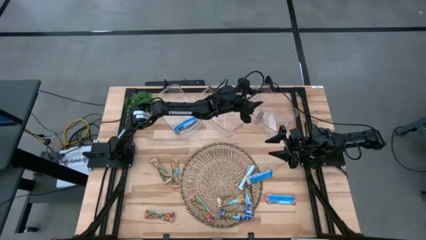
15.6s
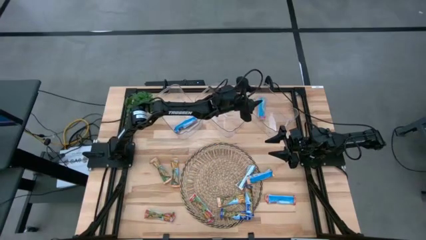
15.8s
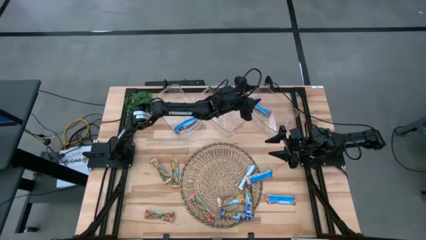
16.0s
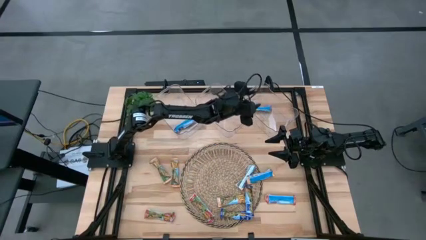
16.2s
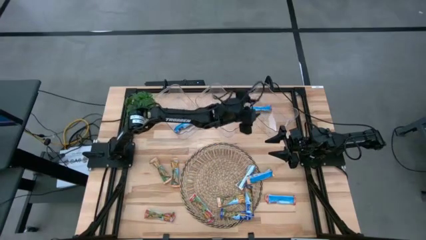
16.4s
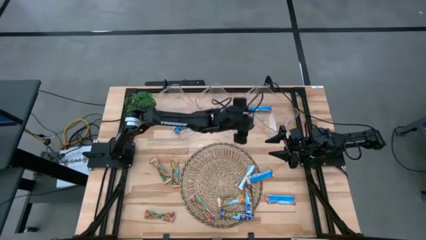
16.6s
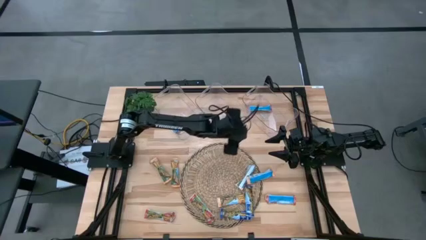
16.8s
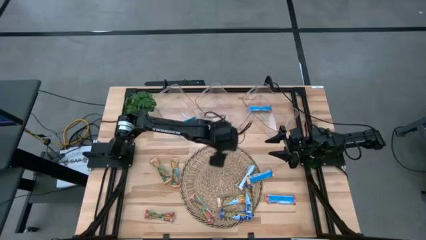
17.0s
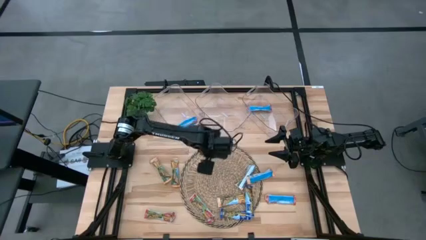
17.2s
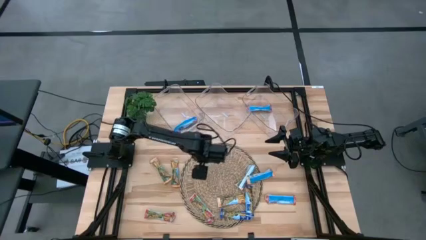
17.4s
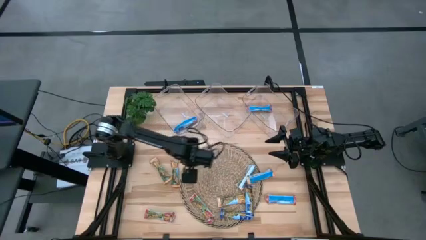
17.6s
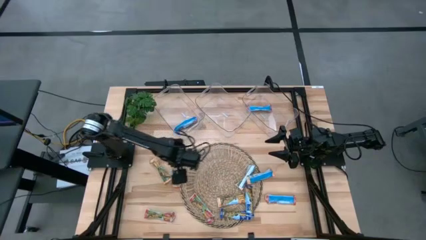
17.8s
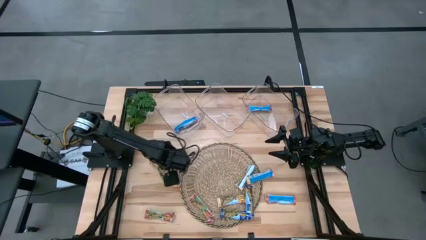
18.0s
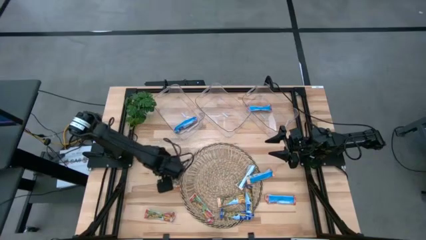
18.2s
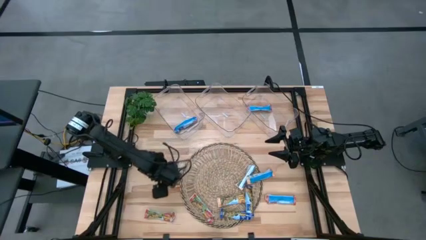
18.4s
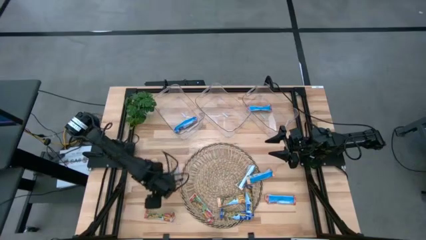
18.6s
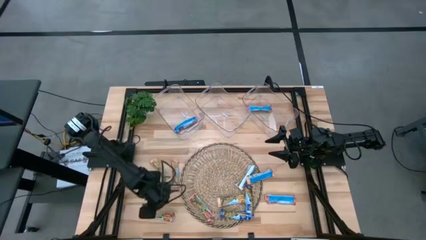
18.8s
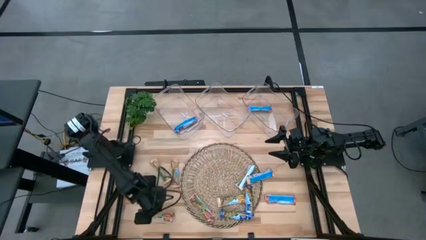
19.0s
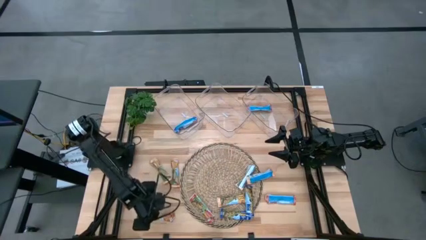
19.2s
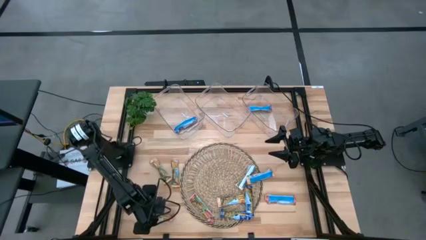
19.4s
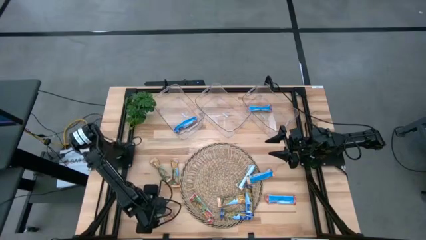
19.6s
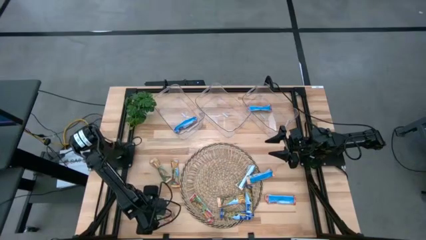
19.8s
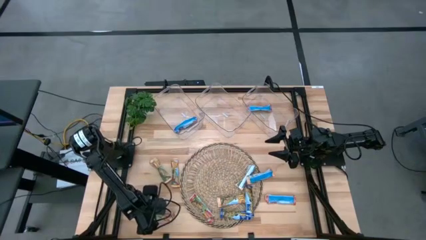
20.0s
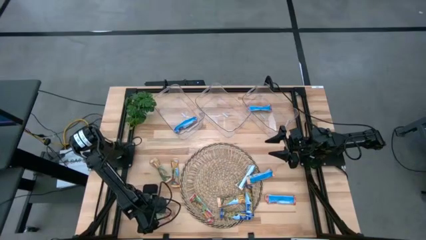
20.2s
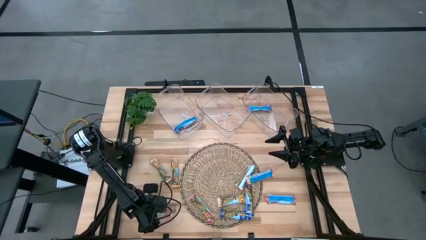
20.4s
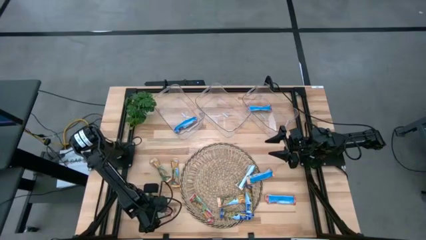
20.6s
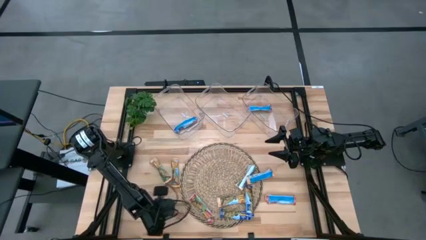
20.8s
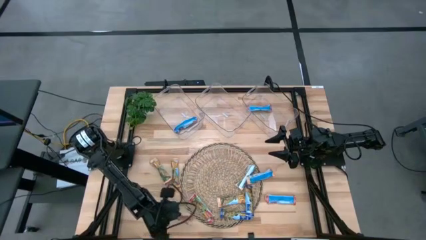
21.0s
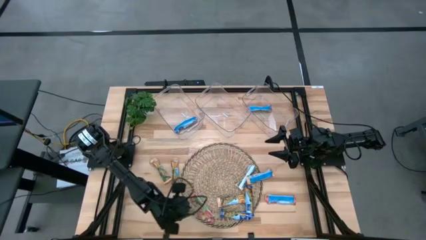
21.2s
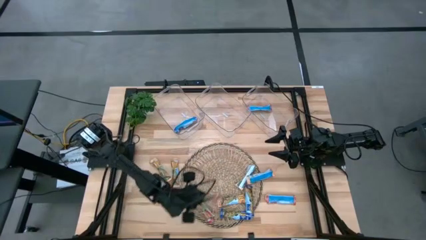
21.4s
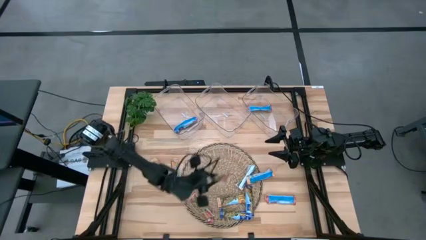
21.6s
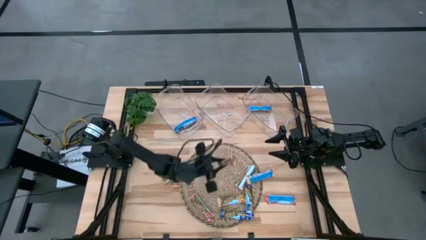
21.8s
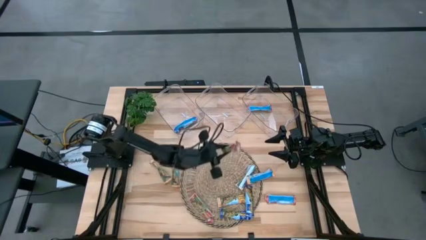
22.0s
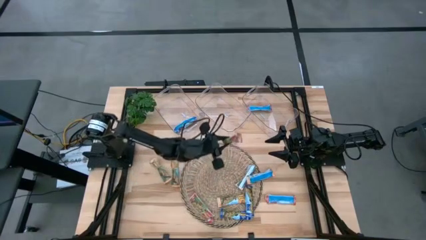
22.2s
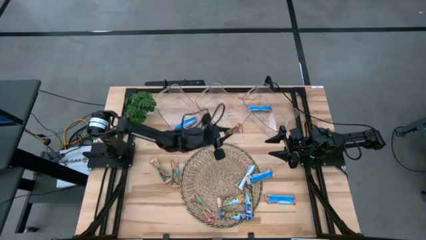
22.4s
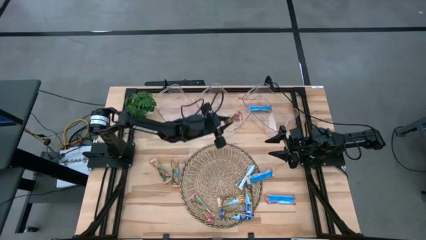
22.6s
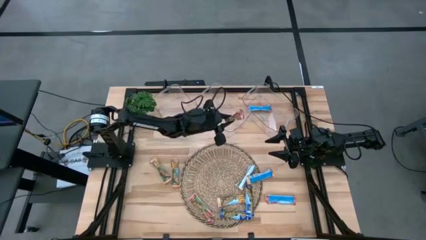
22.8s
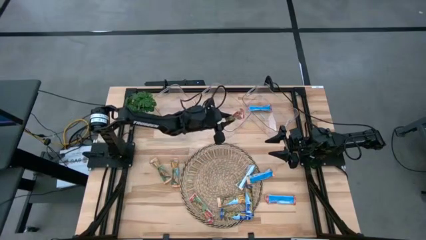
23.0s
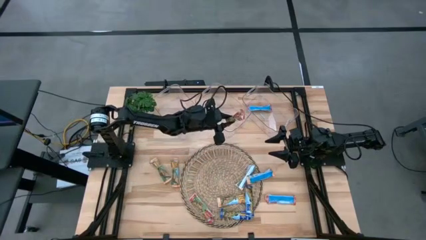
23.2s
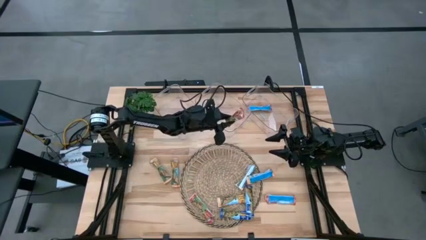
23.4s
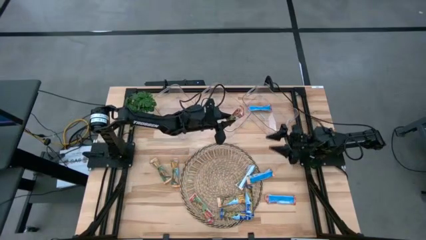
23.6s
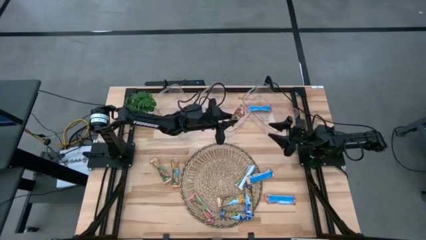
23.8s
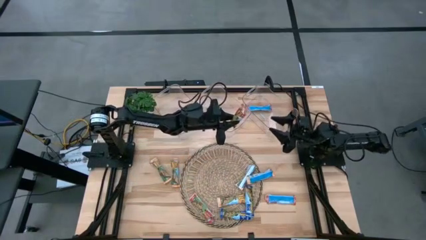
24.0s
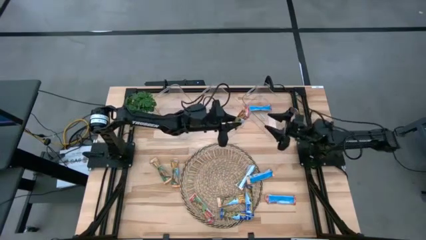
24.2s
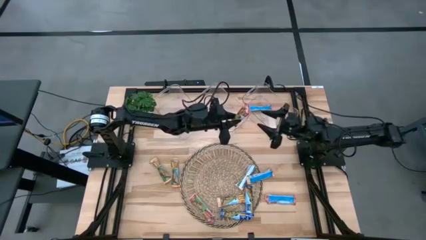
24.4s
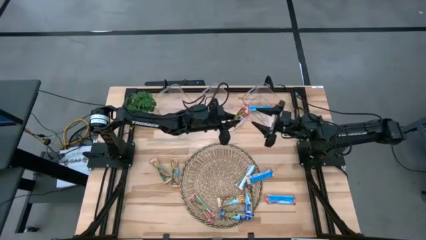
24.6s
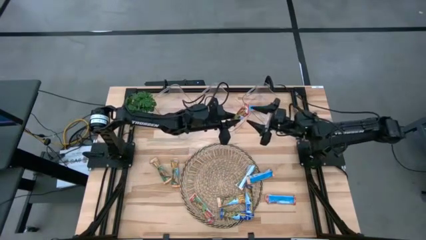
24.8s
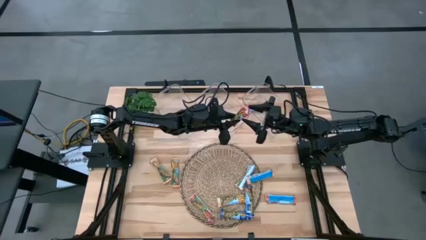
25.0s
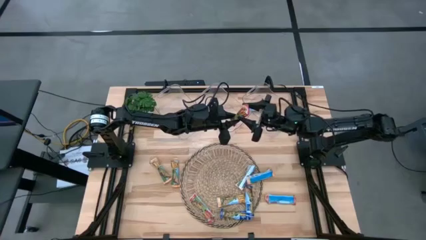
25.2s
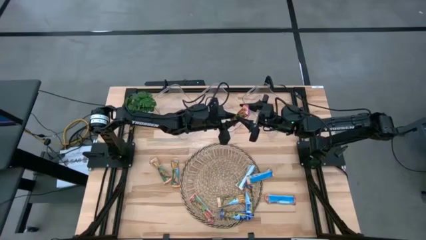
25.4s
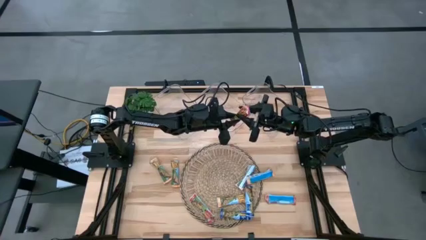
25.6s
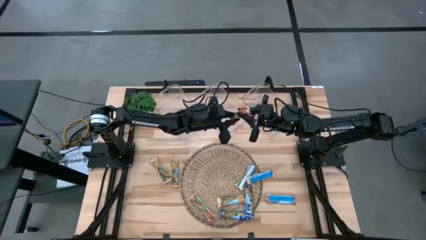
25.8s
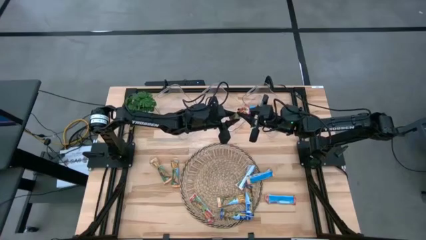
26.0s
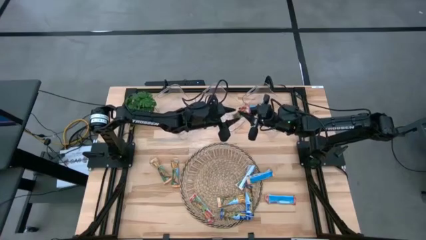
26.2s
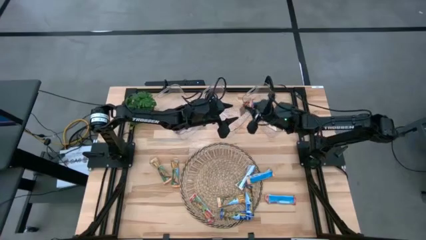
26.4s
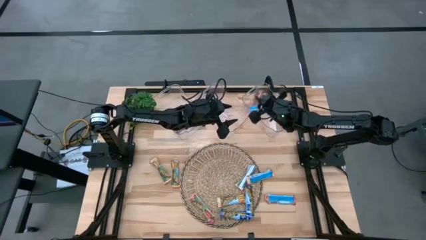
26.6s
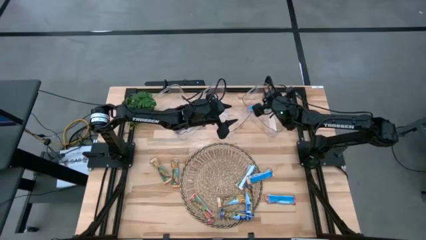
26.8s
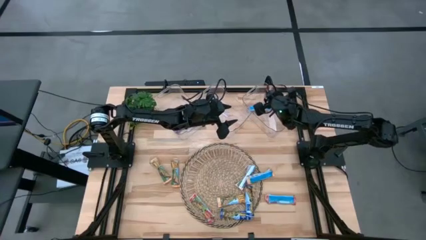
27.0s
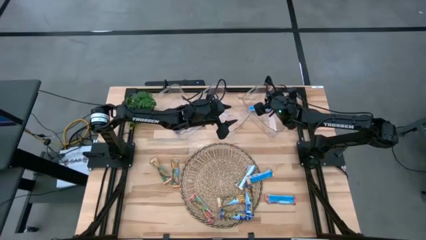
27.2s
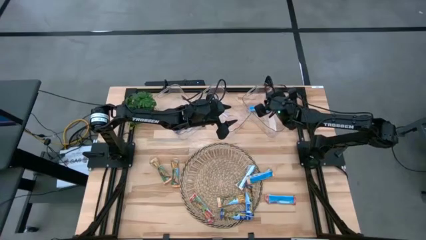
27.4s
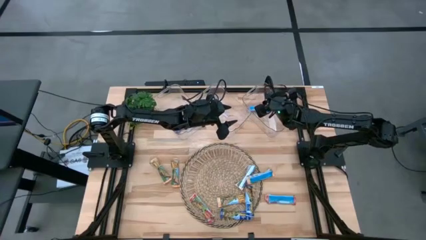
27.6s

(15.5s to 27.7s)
Task: Pick and place Granola Bars by type
Put the red granola bar into the right transparent bin

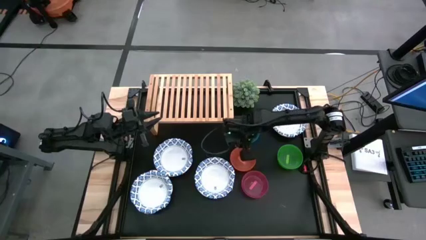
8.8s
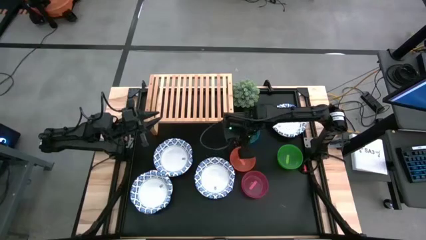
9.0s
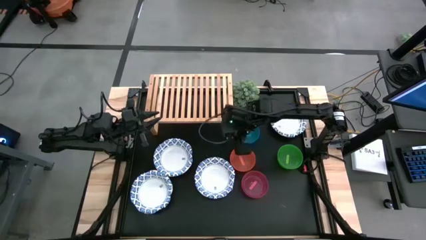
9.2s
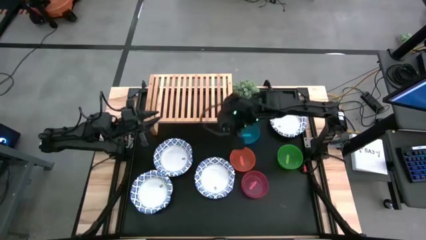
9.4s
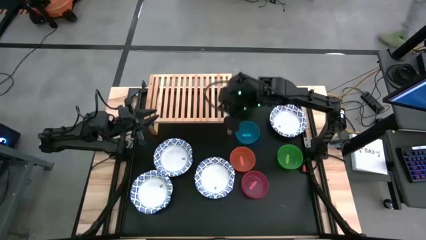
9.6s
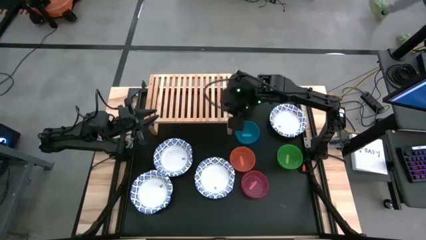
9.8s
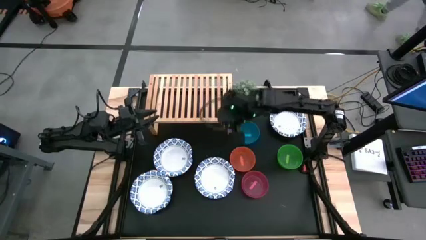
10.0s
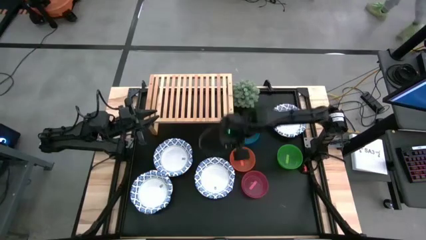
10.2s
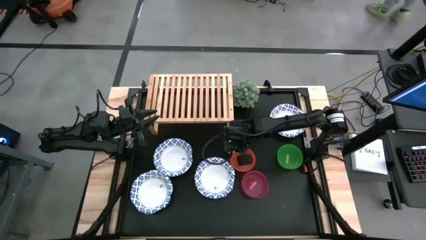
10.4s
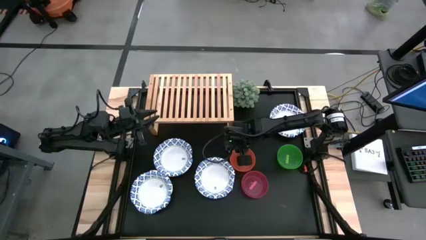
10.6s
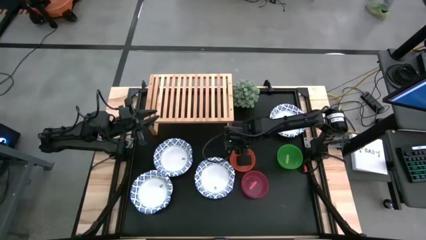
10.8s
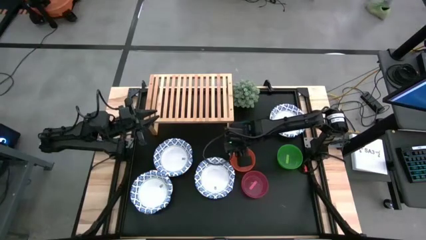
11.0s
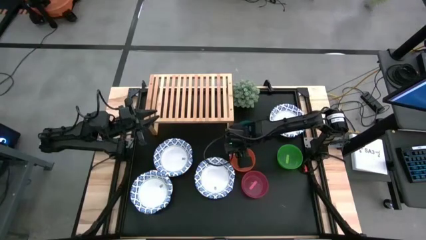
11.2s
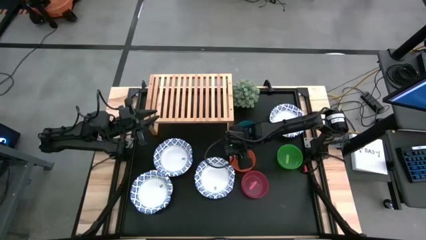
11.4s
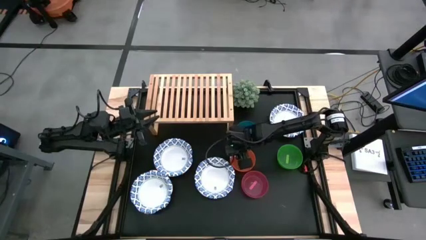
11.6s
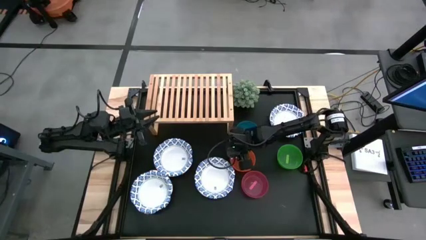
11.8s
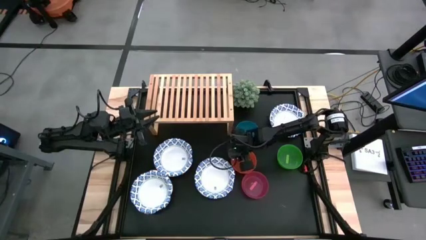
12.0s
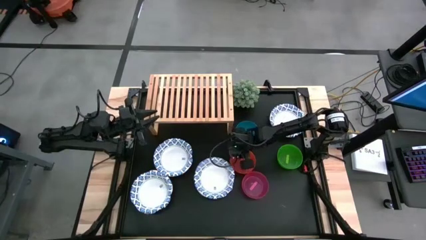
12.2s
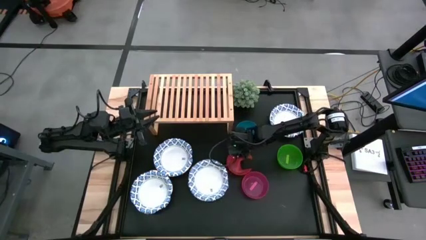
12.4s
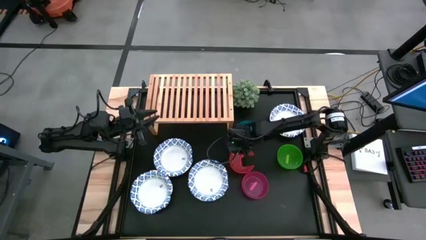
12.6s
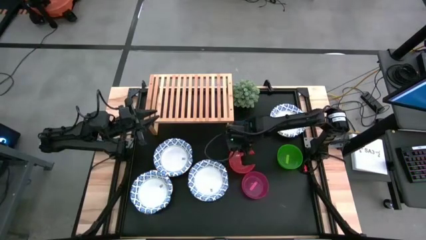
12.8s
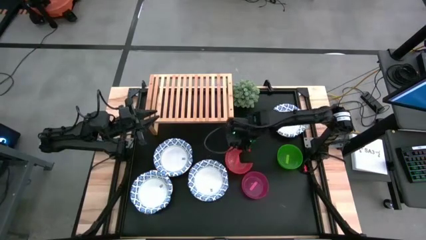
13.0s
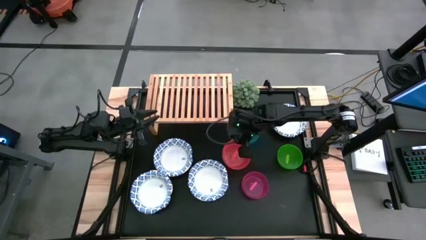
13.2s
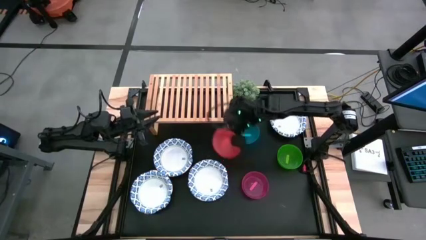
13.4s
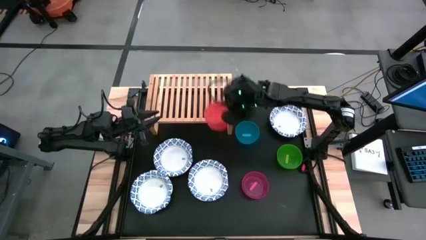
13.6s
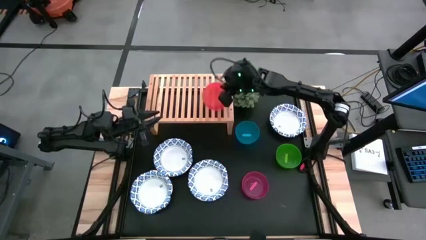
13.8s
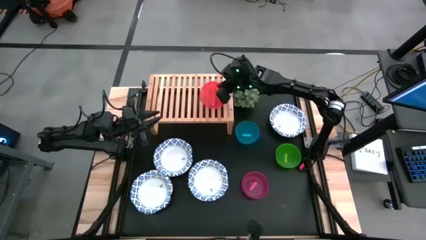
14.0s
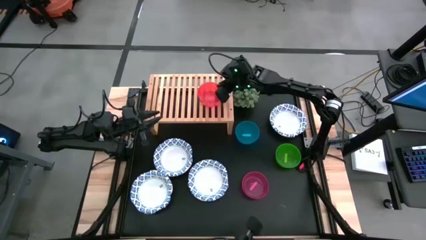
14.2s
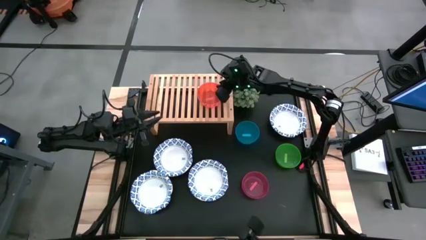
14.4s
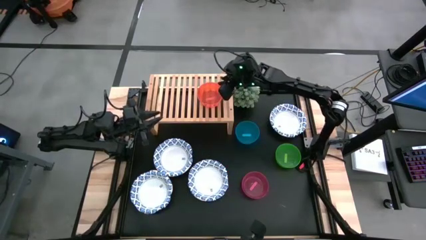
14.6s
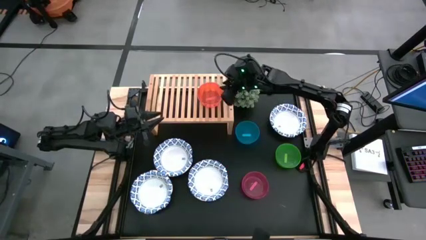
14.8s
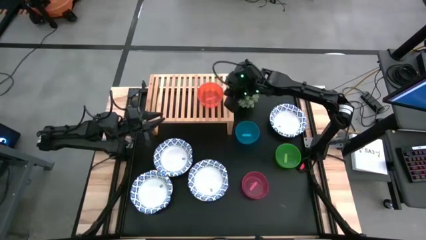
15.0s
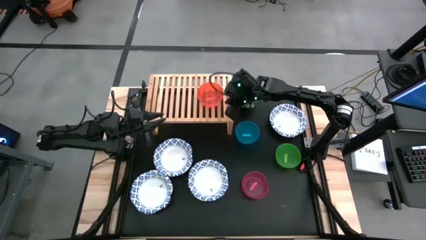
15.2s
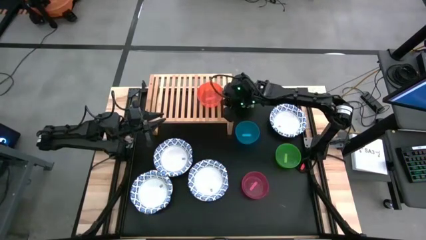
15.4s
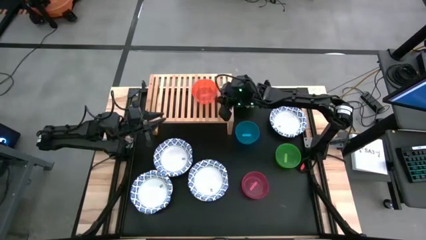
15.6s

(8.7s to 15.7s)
Task: Place and stack bowls onto a shelf
Put the orange bowl on the shelf
